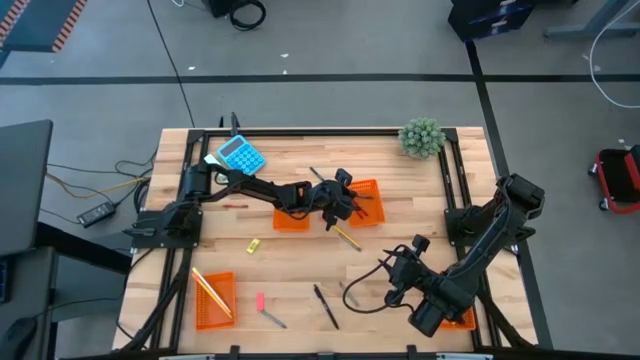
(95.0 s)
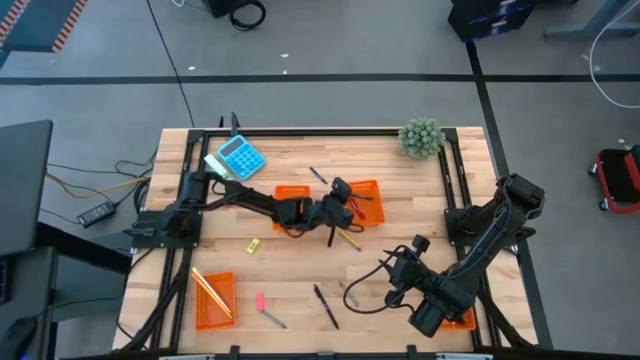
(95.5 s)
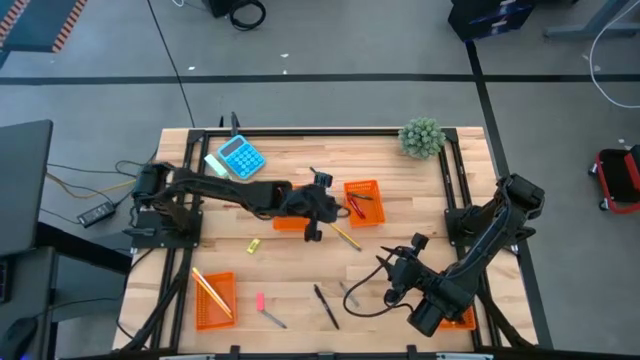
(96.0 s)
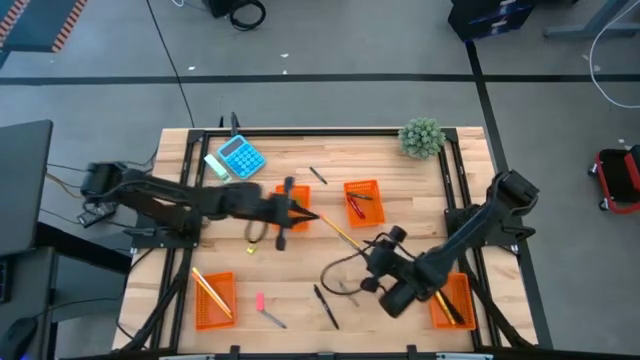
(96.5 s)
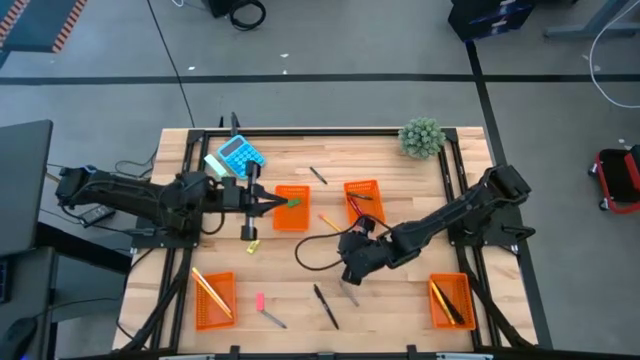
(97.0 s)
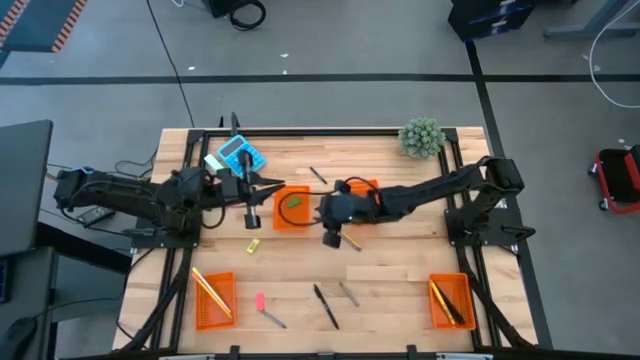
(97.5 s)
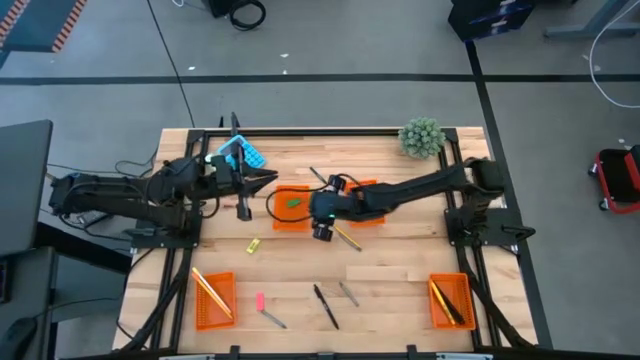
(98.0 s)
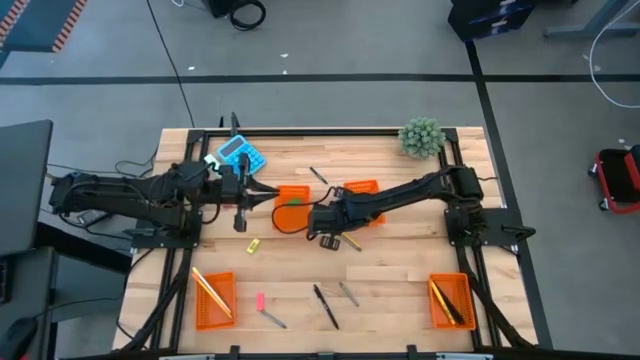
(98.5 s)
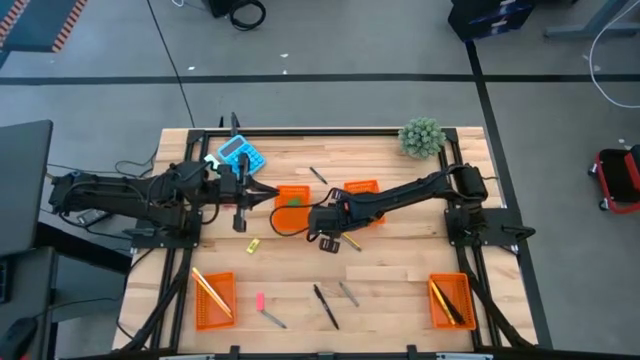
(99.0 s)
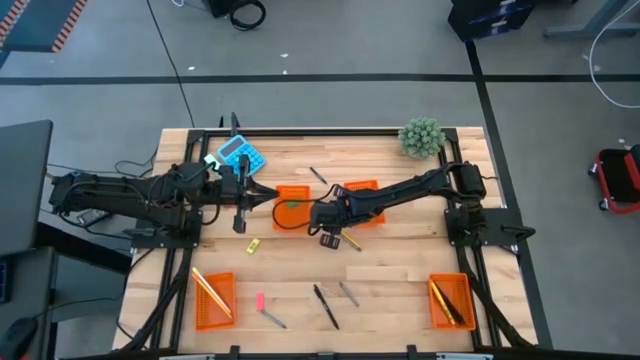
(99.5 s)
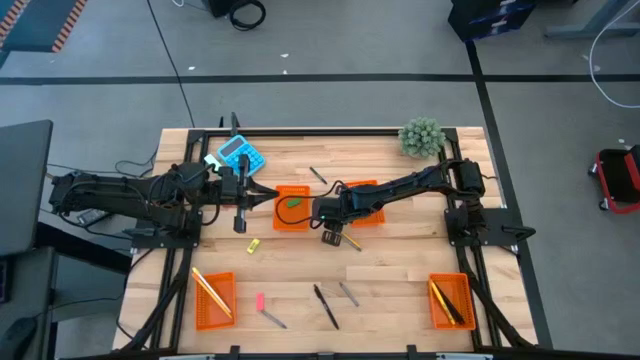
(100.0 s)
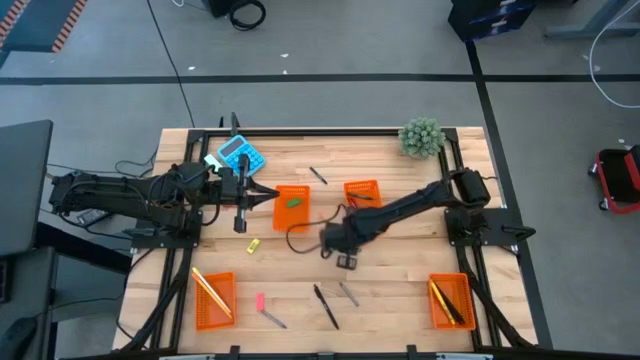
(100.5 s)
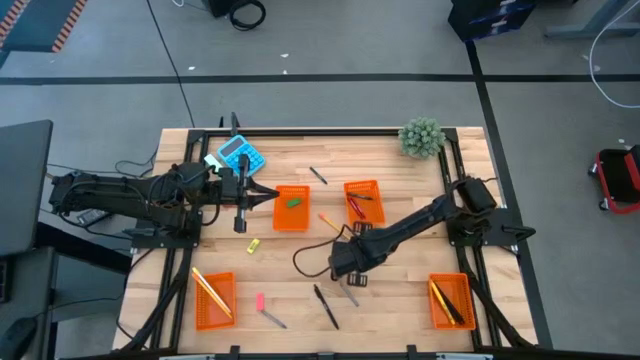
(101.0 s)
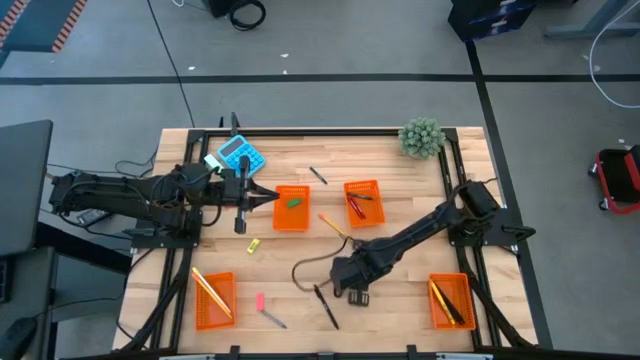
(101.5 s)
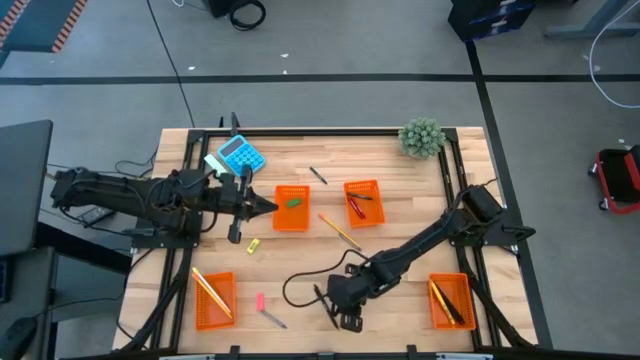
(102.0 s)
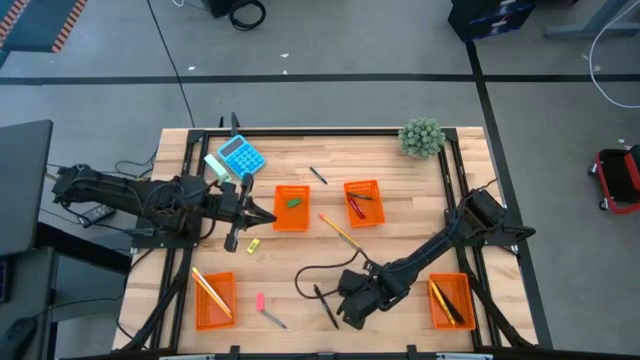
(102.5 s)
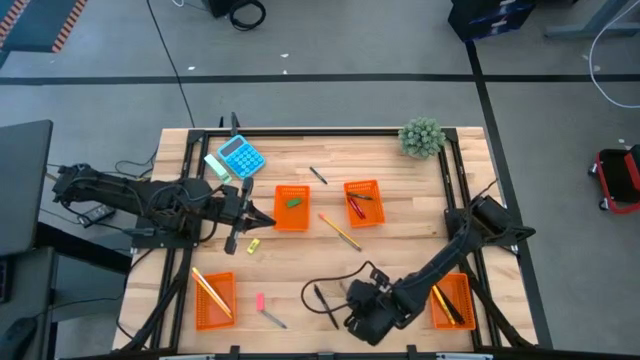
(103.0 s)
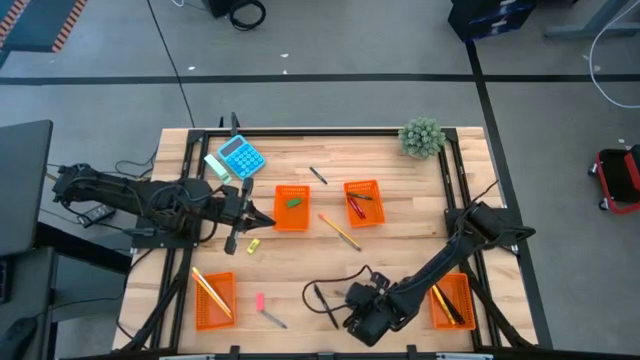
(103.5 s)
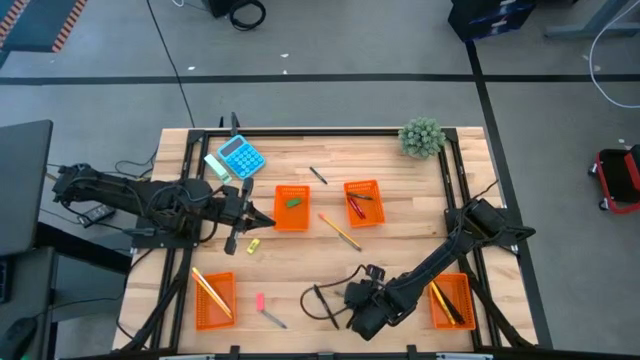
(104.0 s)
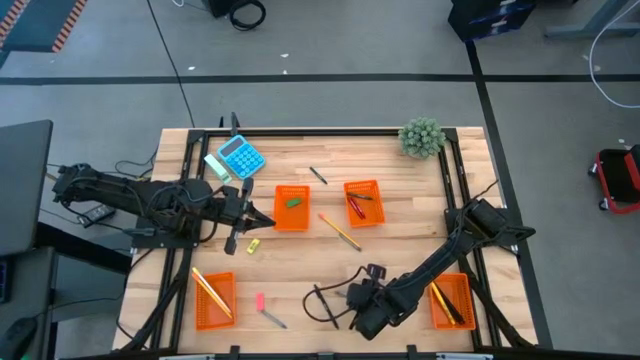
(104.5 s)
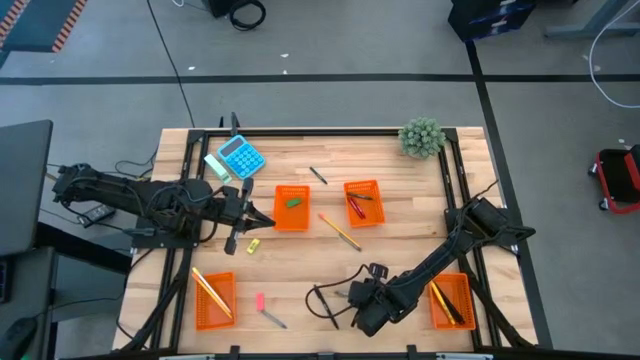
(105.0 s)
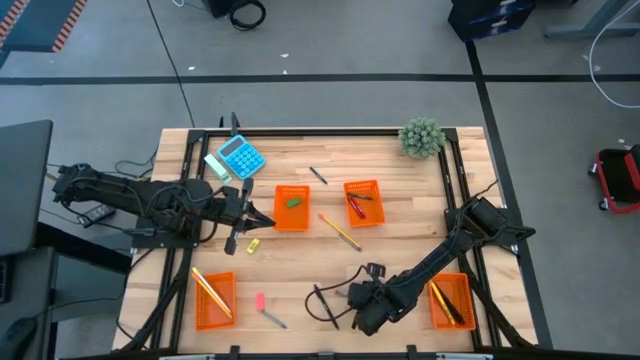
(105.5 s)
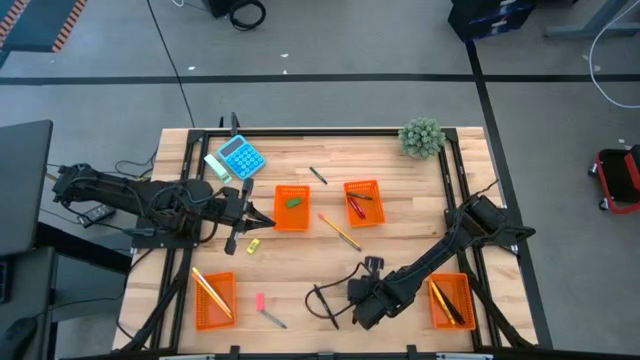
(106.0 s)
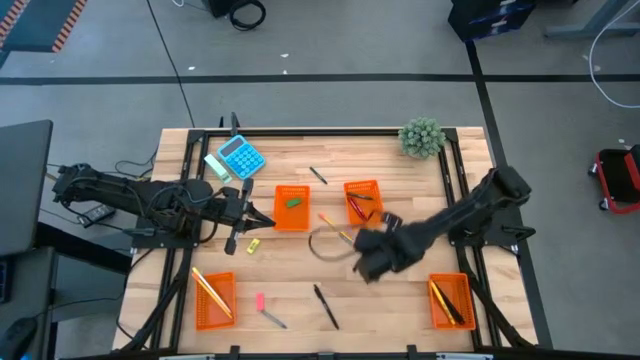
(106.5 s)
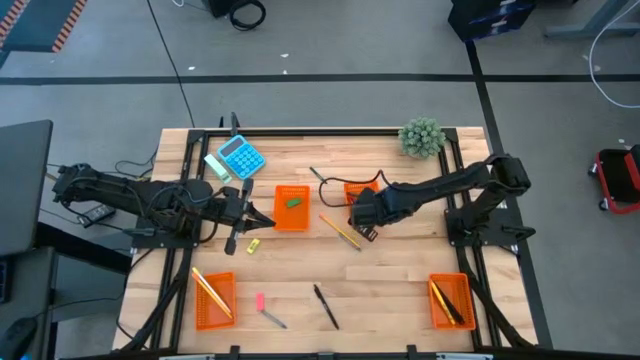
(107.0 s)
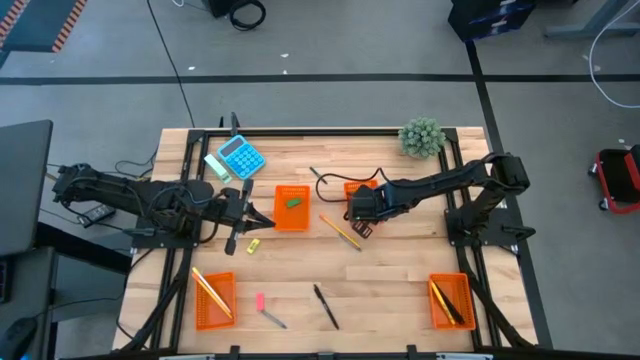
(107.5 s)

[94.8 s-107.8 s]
Task: Sort crayons/erasers/pens/pencils in bins
Put the middle gray crayon into the top right orange bin

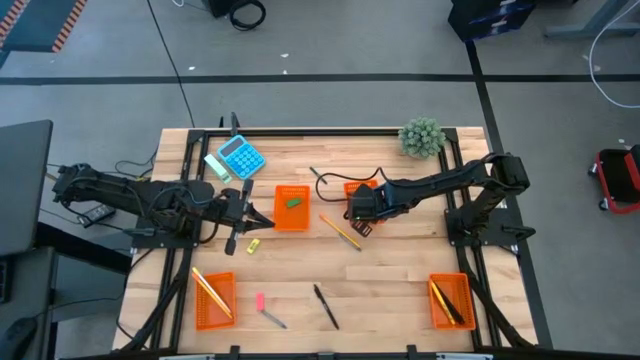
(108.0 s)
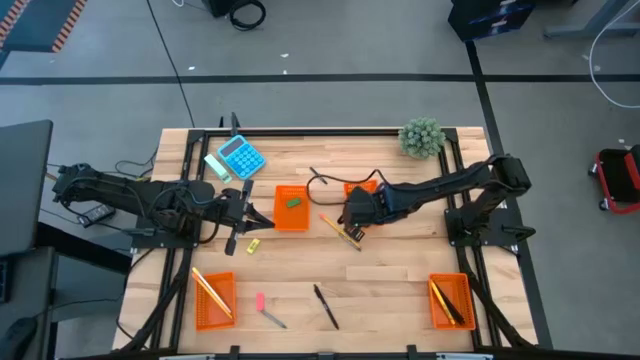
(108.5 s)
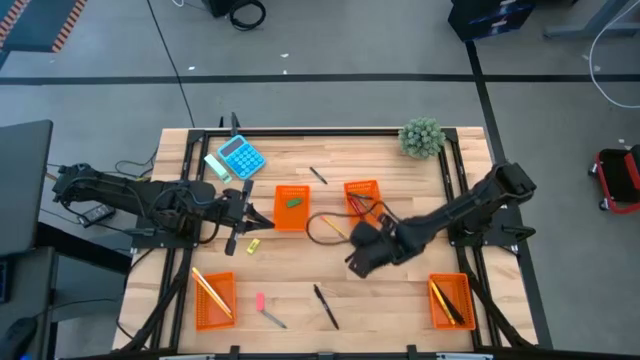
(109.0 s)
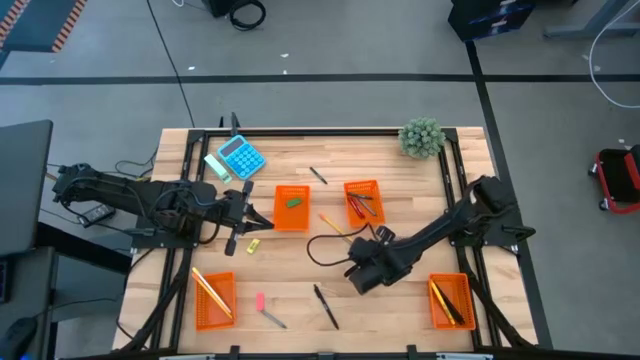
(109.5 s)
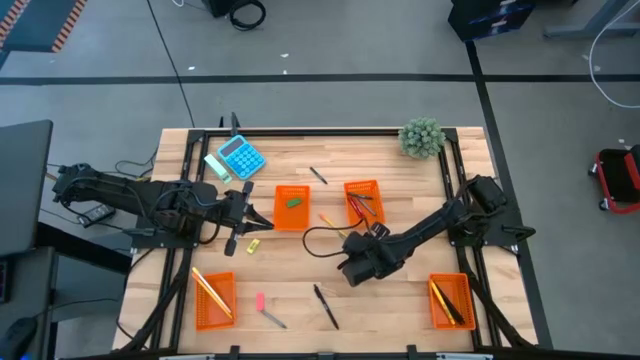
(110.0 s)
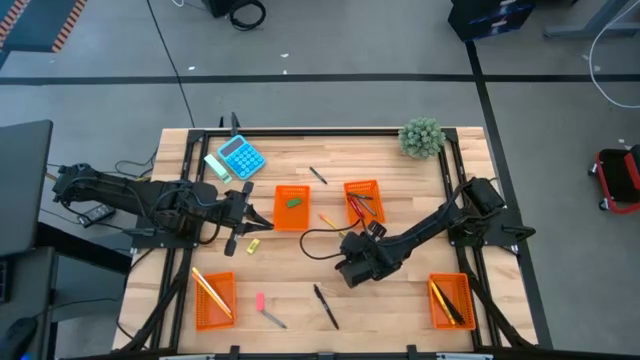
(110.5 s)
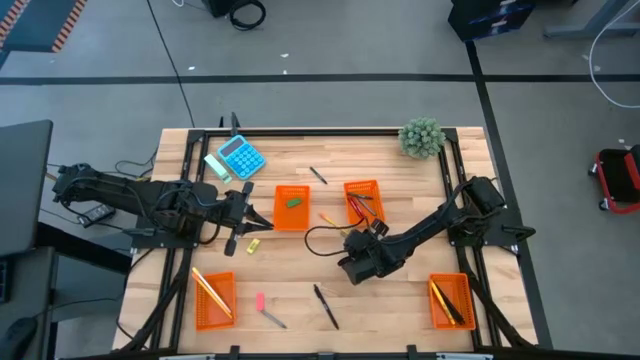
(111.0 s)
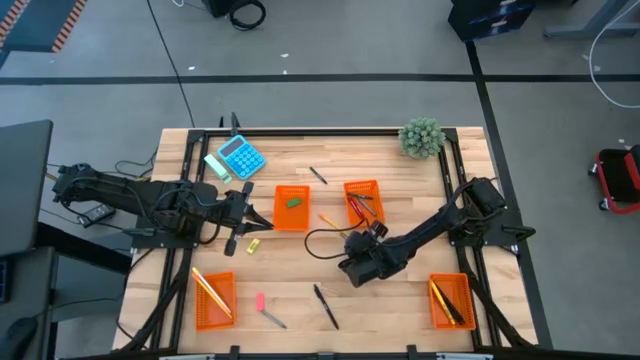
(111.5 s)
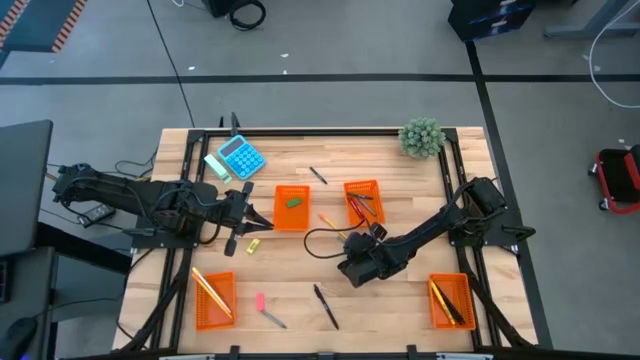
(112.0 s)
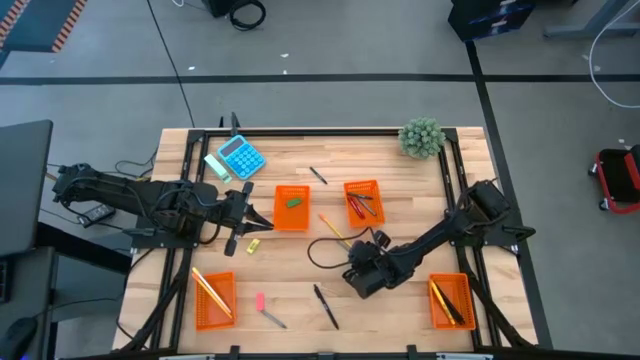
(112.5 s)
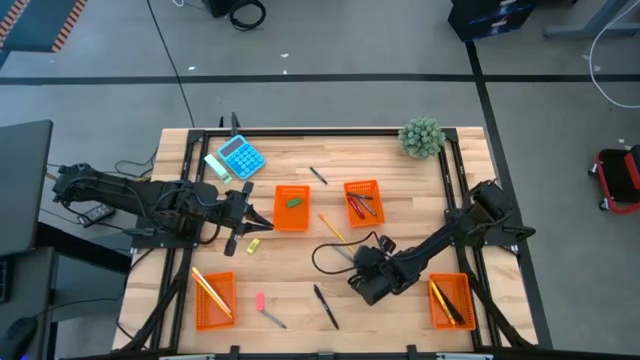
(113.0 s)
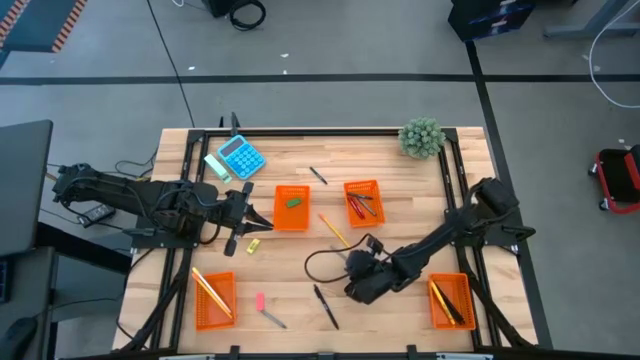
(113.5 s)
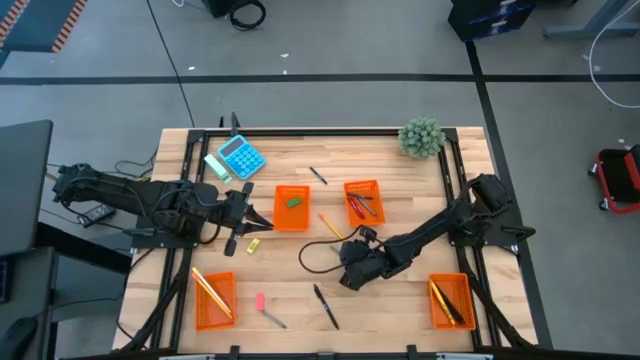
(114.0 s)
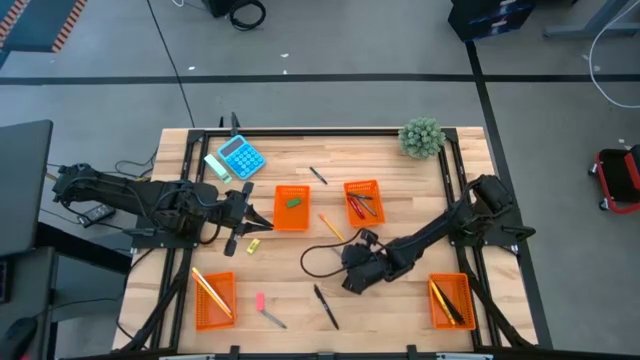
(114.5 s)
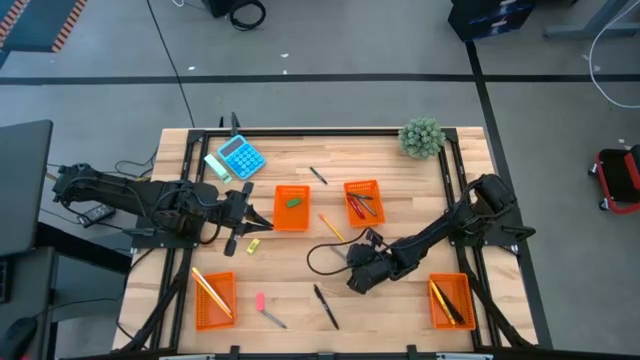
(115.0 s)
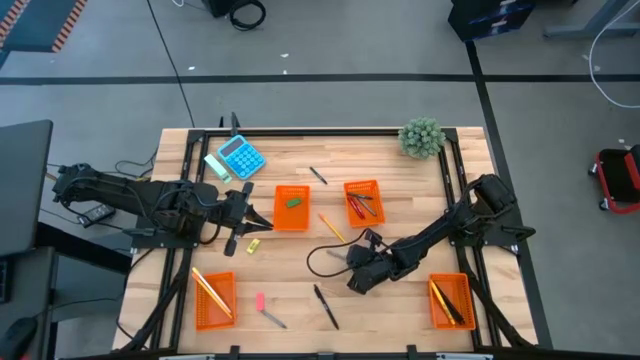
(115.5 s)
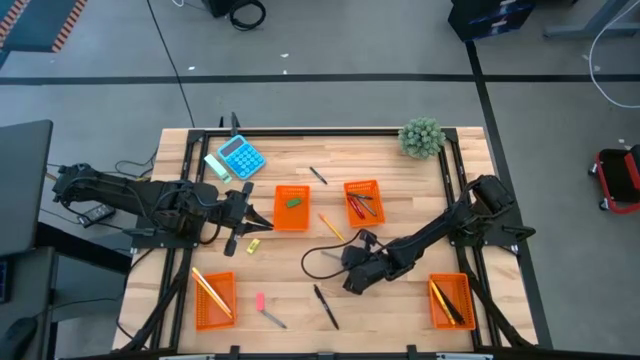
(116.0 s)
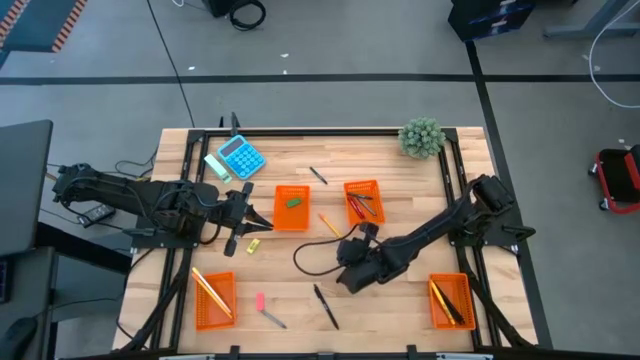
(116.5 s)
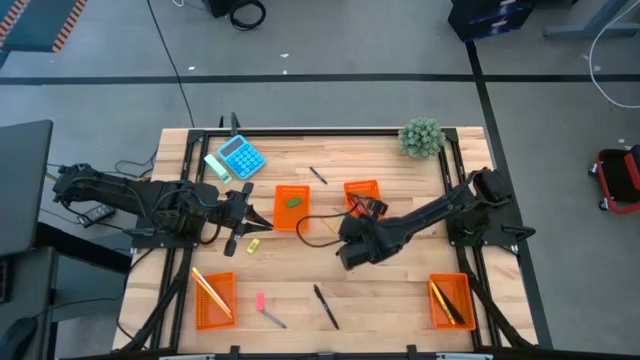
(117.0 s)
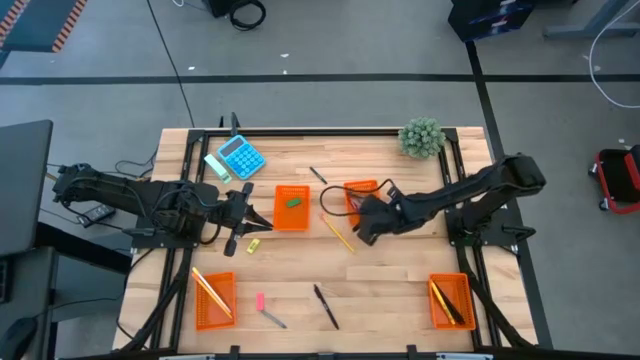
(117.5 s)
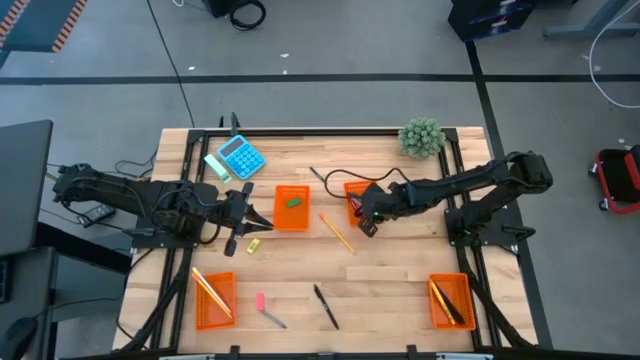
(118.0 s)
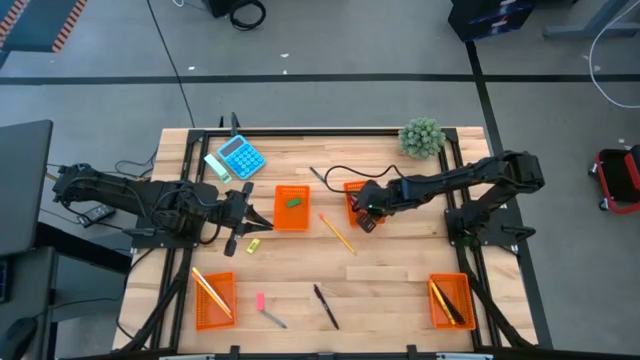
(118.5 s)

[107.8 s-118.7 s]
Put the top gray crayon into the top right orange bin
